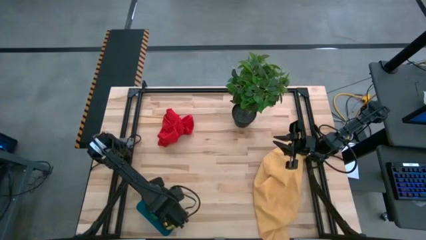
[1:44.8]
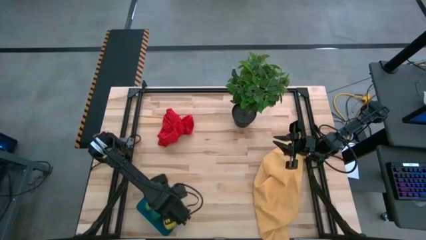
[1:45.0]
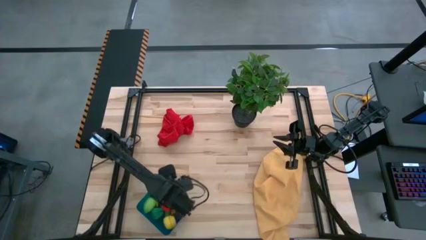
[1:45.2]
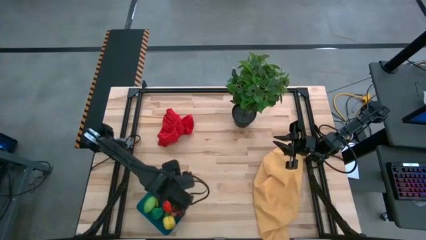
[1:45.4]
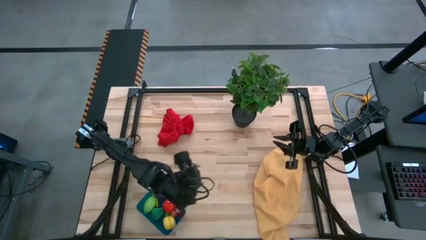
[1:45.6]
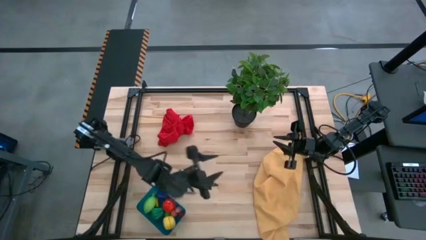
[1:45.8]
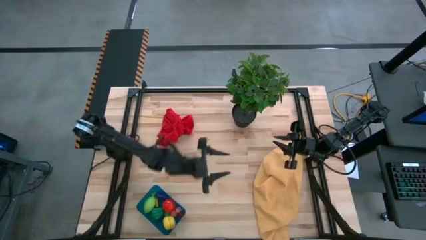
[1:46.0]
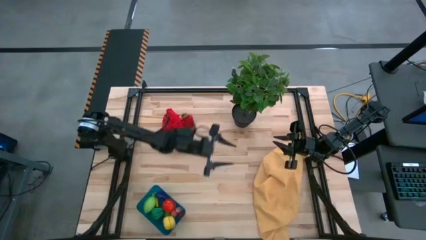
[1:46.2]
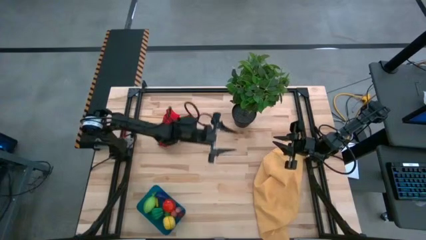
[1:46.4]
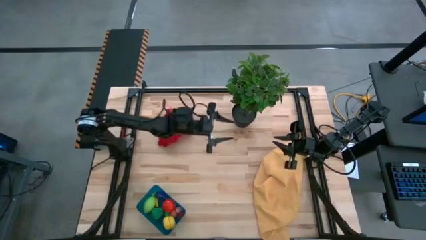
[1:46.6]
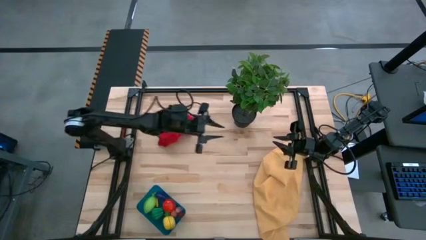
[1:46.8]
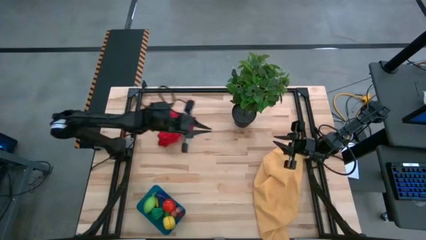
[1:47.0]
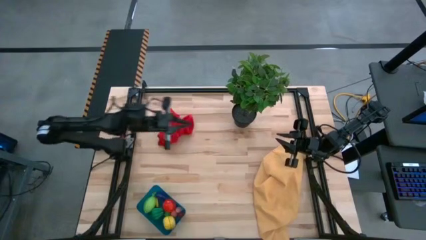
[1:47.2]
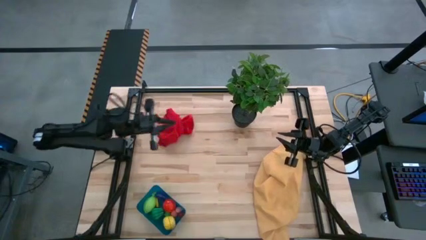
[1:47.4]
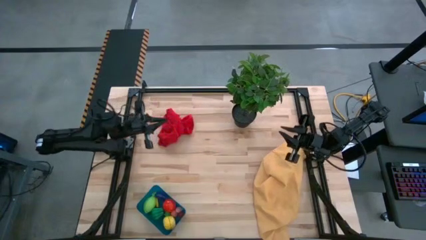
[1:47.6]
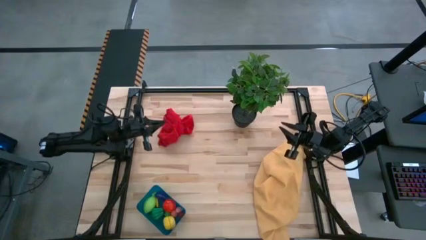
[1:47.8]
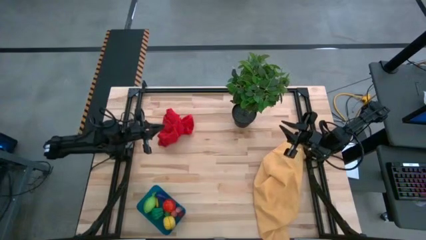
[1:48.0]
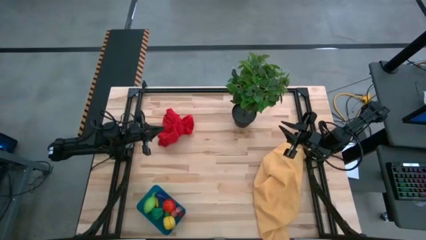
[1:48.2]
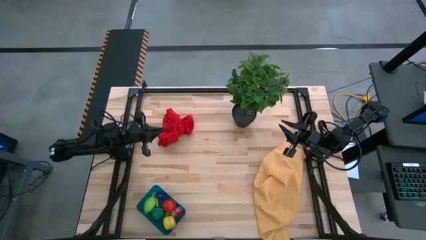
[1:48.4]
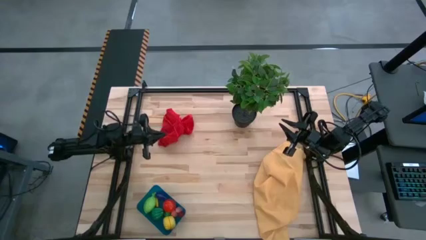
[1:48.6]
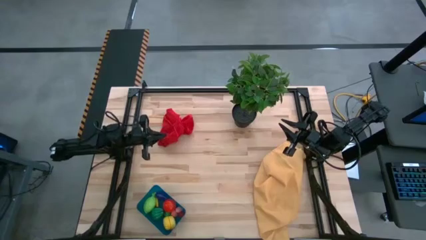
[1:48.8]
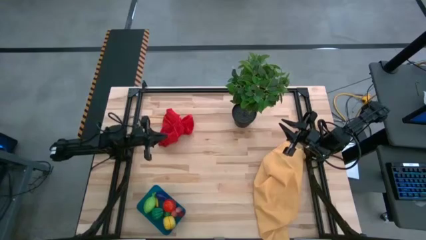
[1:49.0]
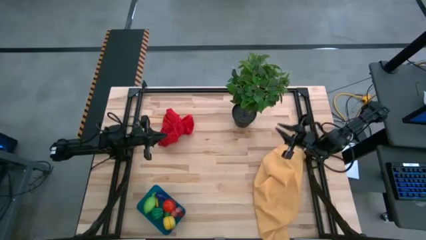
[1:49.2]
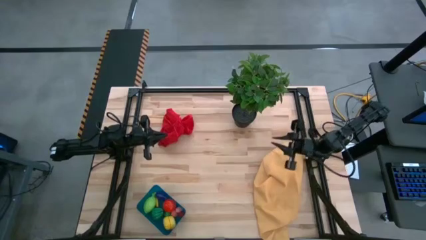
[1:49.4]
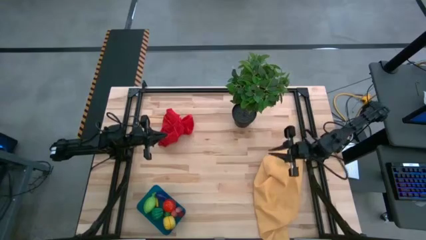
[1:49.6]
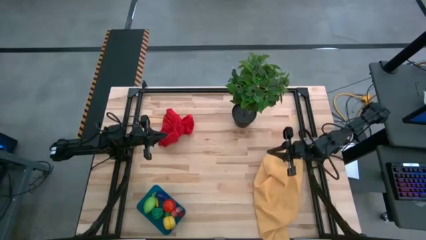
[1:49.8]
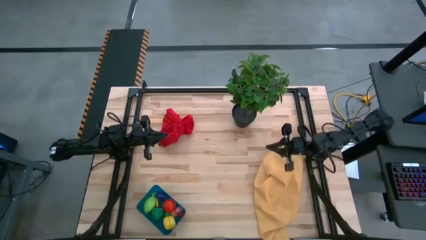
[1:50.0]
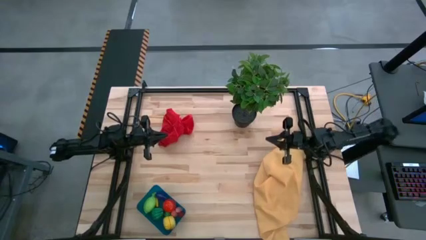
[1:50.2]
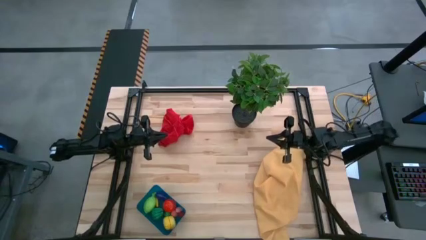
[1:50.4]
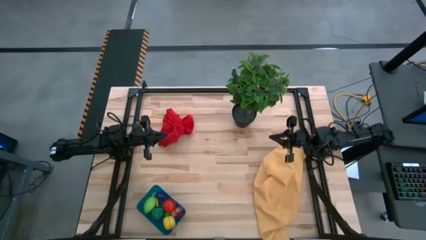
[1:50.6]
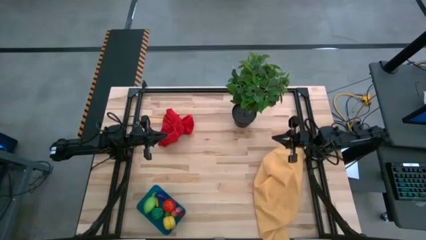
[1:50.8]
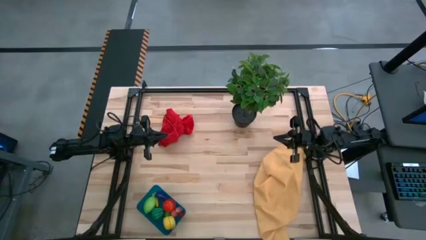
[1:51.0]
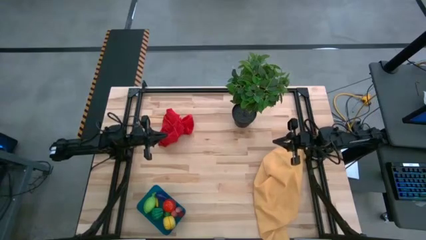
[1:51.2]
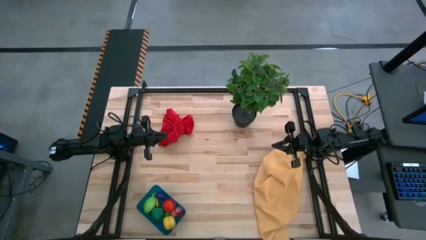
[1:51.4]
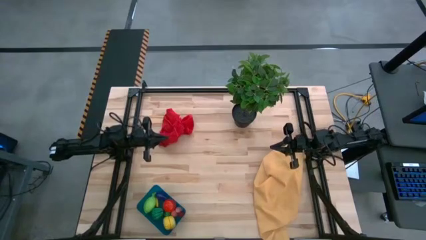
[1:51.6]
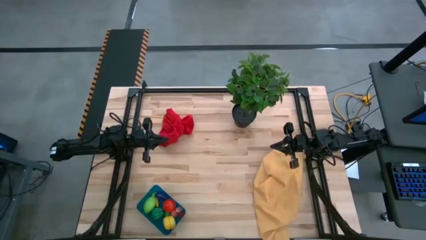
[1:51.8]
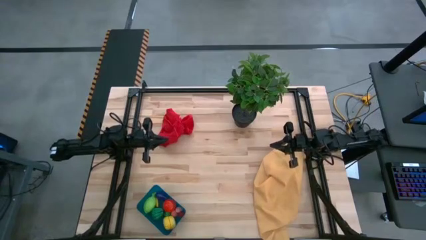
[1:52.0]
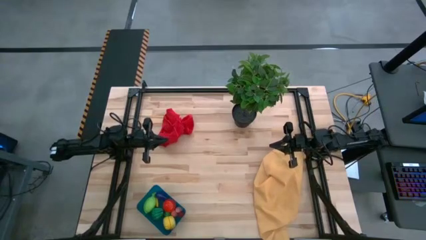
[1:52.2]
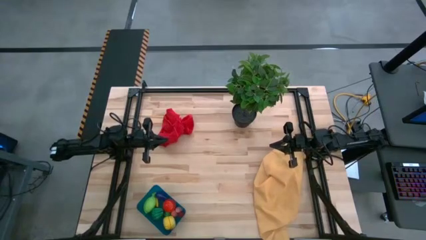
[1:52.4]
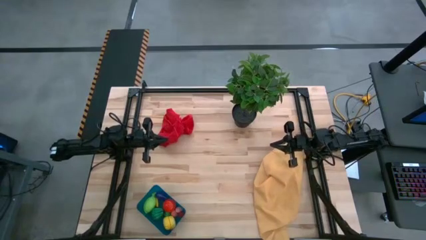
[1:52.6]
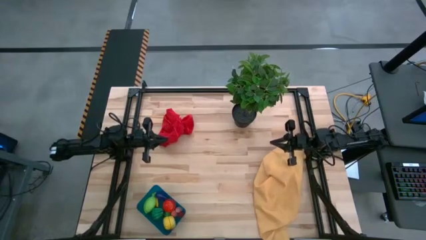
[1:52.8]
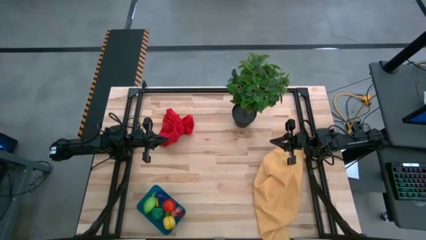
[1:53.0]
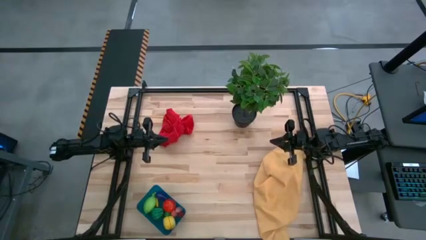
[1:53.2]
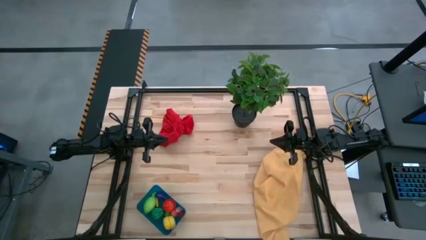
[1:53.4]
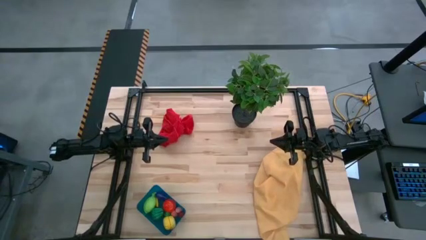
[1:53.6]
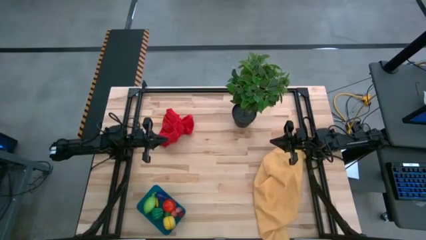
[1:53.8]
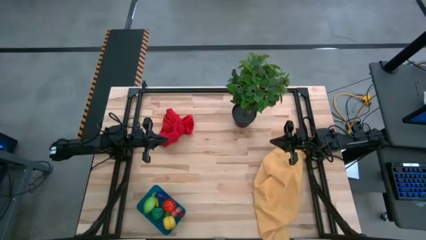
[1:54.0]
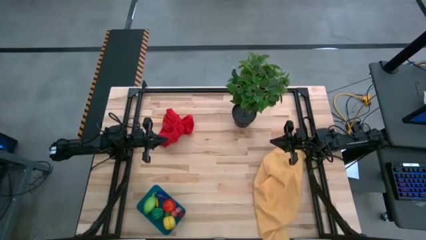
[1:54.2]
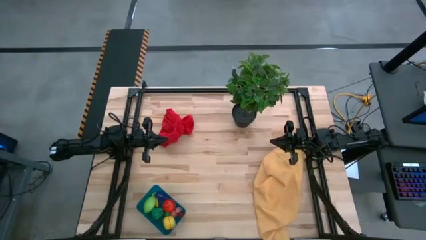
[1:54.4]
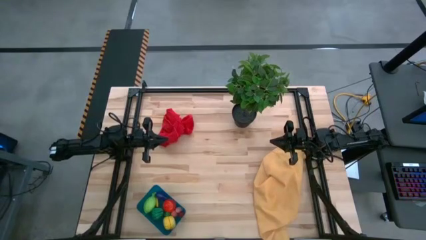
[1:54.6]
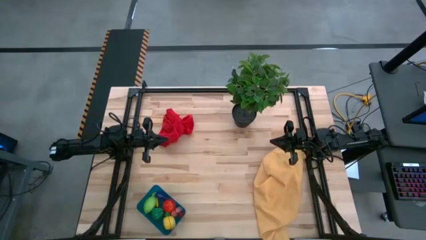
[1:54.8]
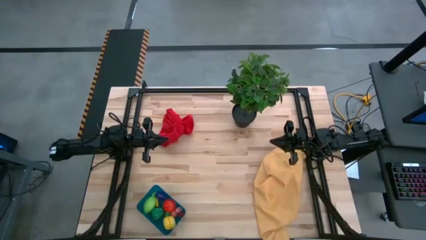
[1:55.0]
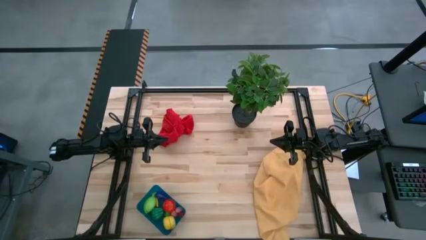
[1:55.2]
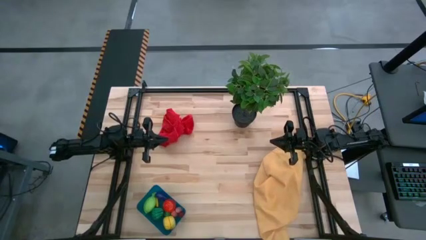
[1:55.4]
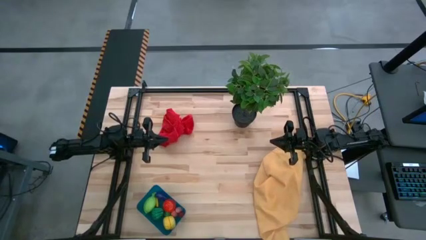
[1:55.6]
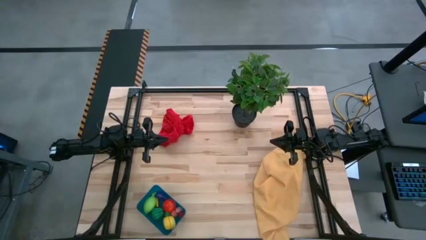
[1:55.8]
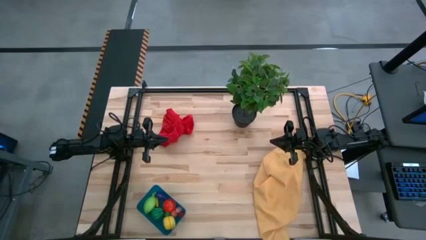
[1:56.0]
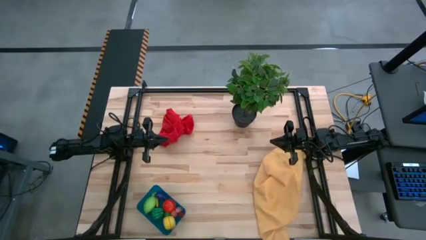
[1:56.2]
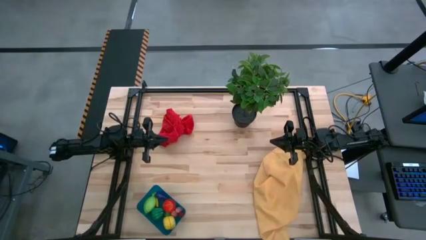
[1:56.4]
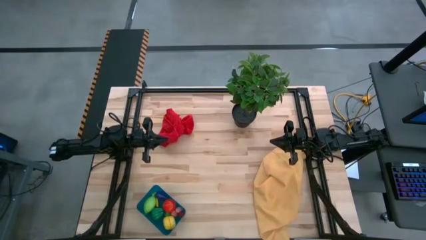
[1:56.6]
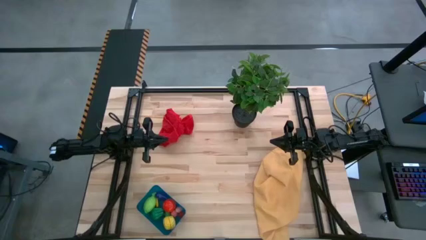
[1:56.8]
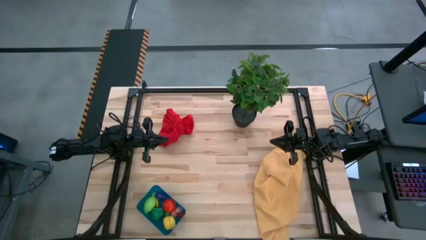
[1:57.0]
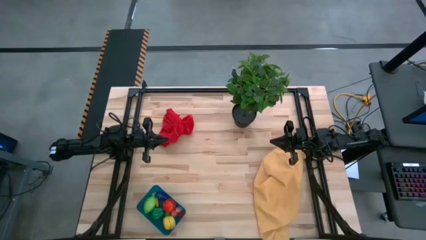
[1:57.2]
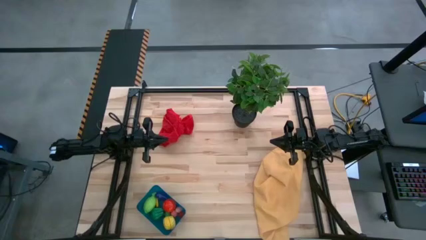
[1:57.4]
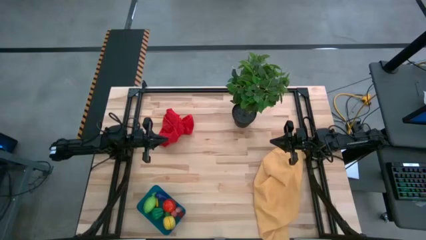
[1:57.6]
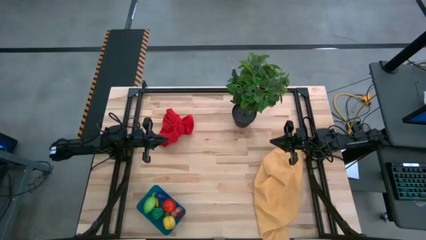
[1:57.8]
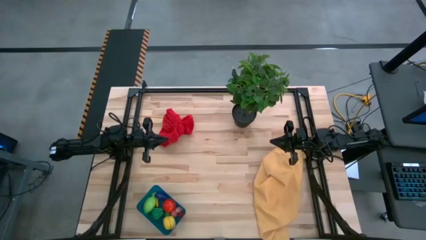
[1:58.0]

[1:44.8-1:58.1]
Task: Pick and placing Produce into tupperware
Return to Home Position

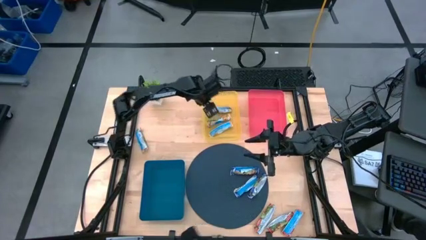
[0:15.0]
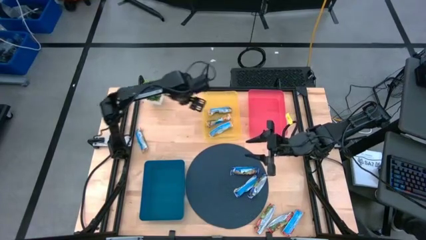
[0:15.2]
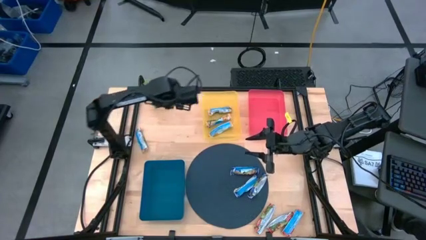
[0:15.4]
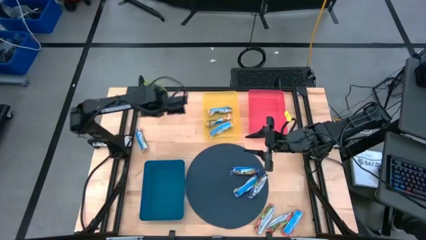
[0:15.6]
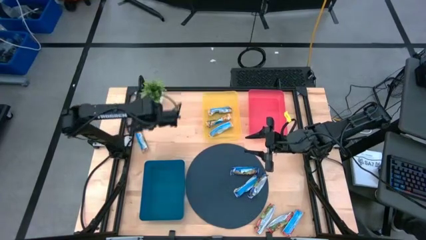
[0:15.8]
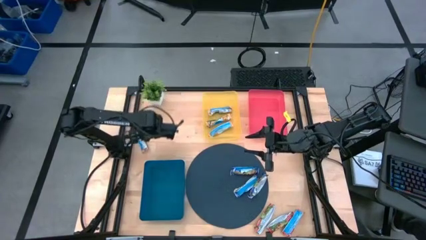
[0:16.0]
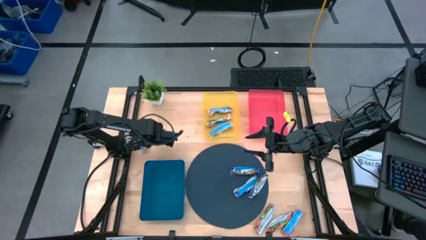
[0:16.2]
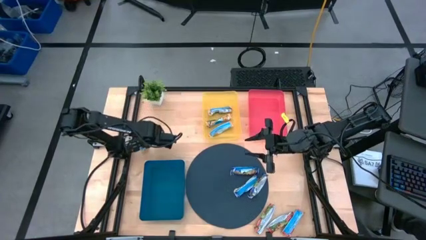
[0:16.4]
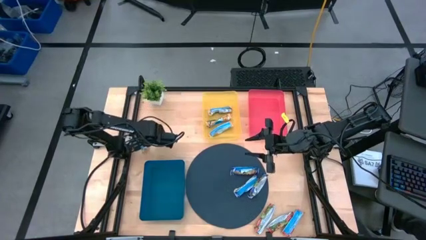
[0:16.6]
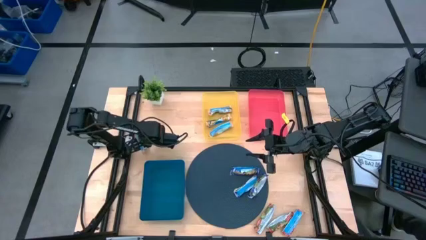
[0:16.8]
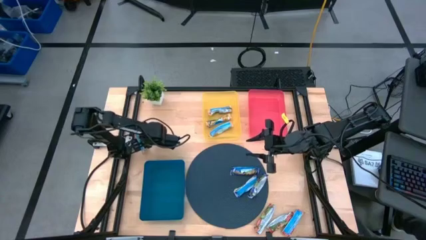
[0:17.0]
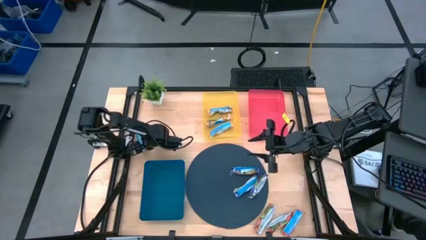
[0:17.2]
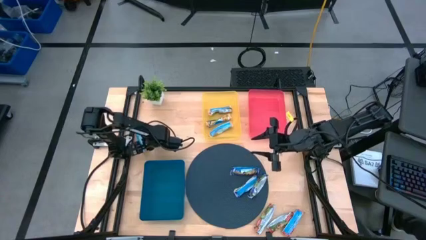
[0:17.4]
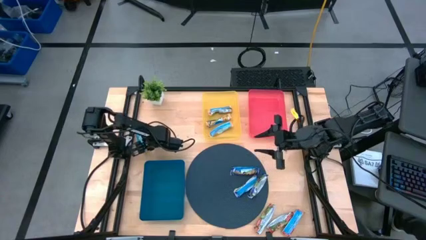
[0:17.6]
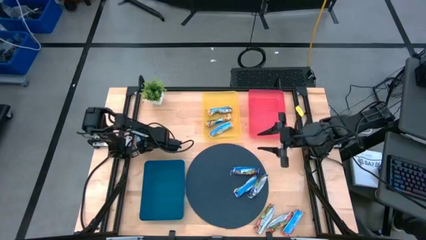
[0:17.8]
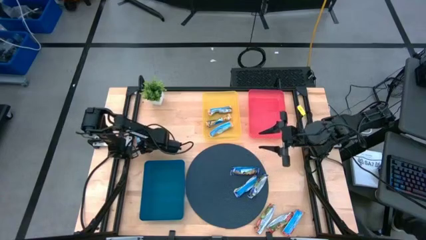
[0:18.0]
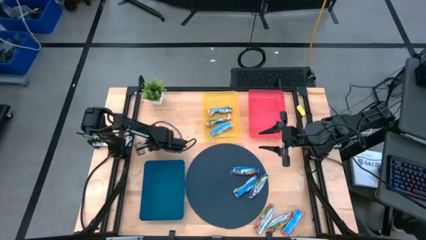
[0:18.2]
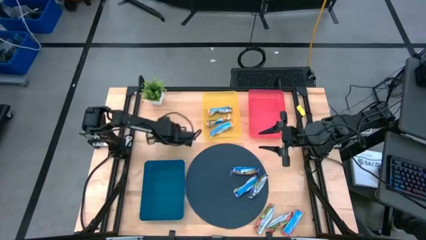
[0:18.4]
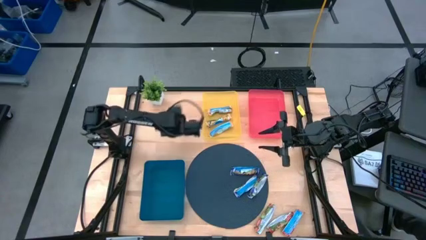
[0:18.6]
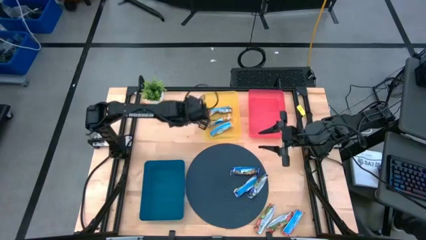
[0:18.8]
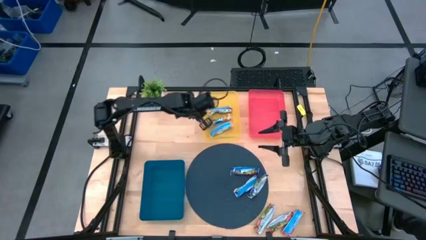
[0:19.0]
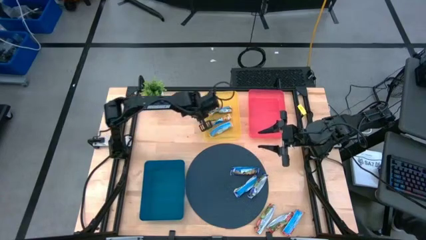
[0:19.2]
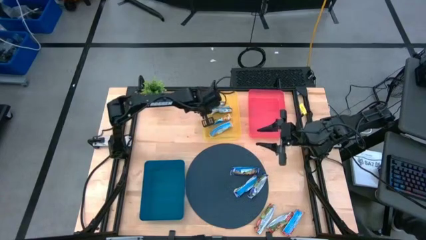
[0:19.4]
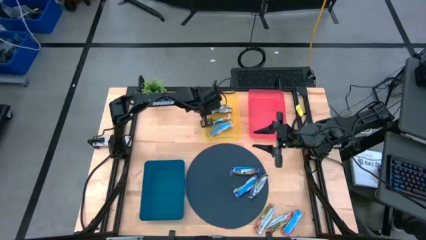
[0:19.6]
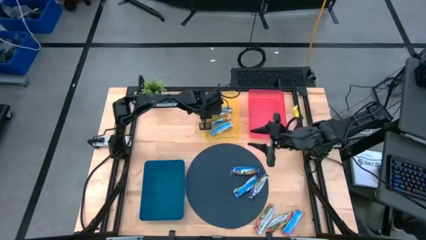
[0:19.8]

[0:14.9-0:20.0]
Task: Pick and place Granola Bars by type
Put the yellow granola bar into the yellow bin
